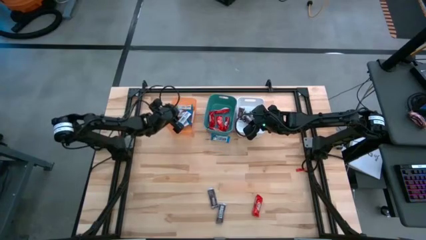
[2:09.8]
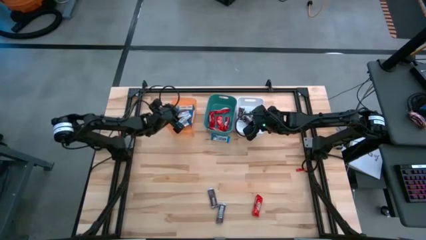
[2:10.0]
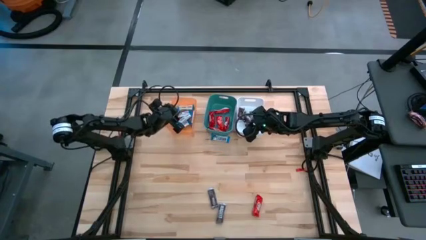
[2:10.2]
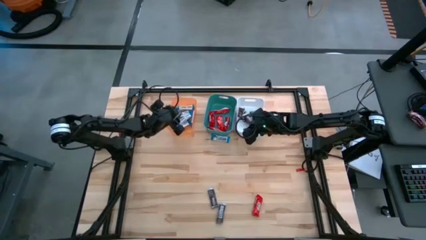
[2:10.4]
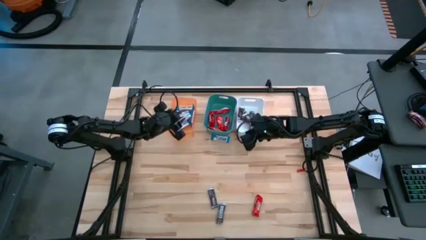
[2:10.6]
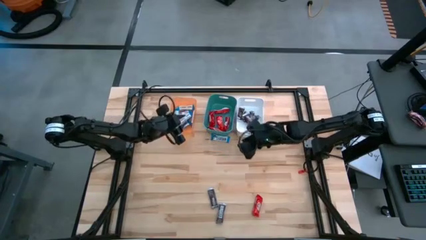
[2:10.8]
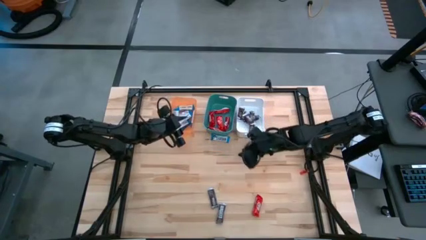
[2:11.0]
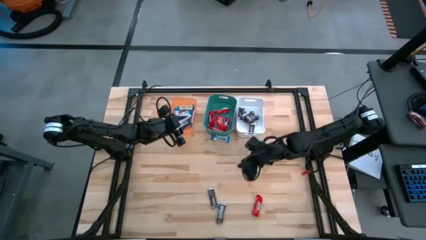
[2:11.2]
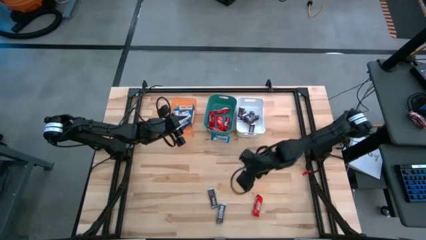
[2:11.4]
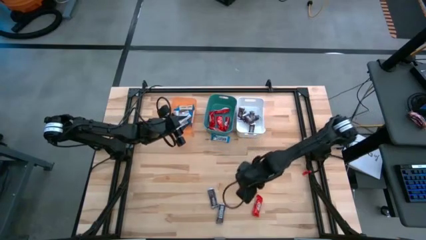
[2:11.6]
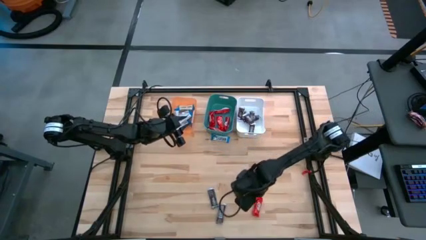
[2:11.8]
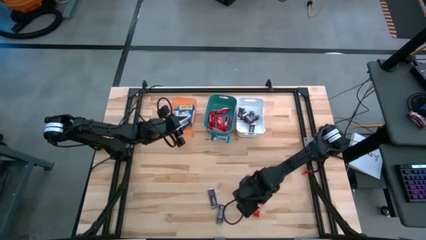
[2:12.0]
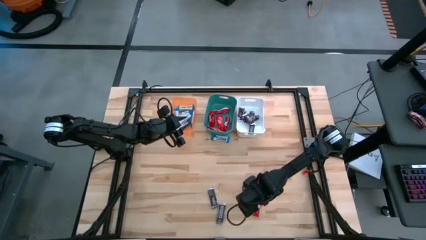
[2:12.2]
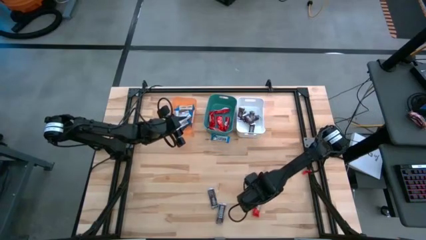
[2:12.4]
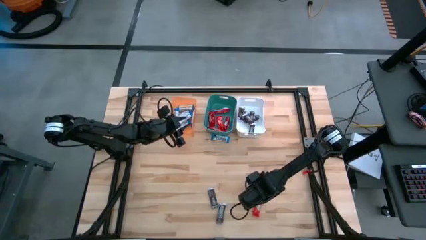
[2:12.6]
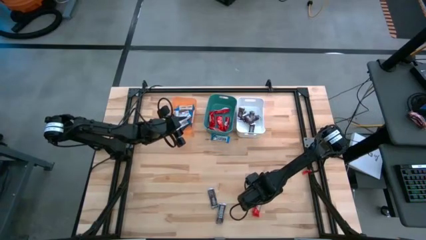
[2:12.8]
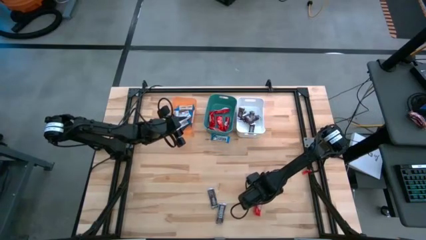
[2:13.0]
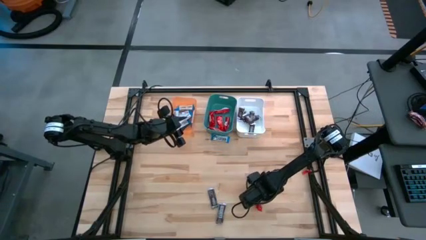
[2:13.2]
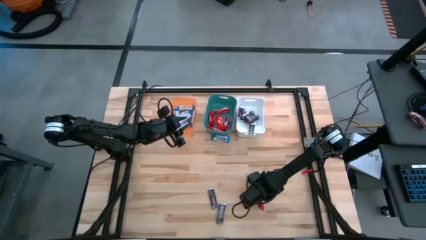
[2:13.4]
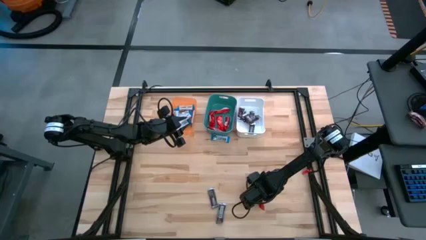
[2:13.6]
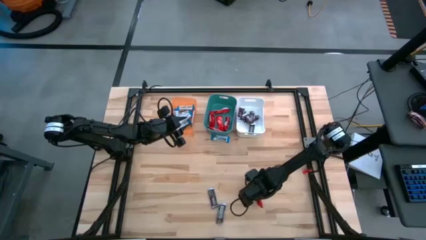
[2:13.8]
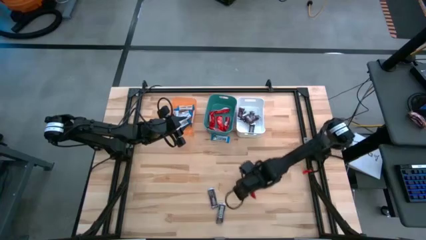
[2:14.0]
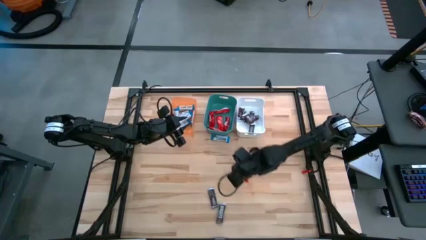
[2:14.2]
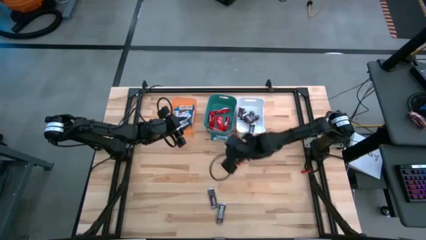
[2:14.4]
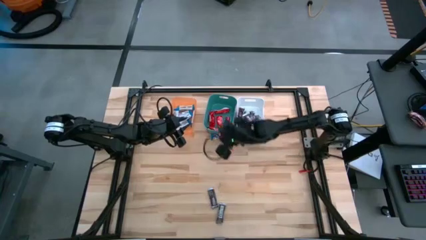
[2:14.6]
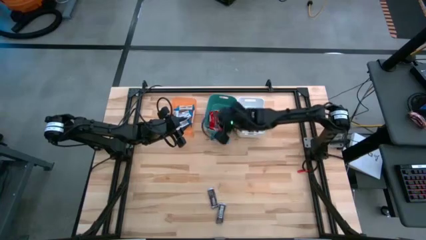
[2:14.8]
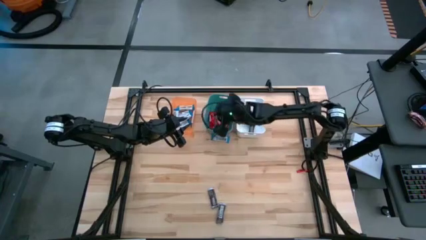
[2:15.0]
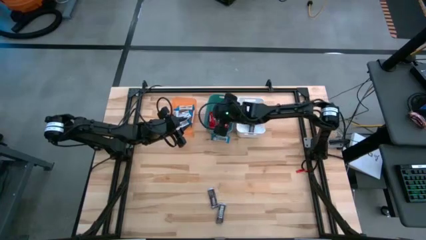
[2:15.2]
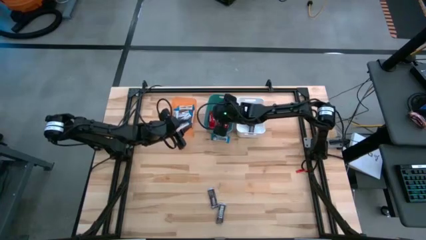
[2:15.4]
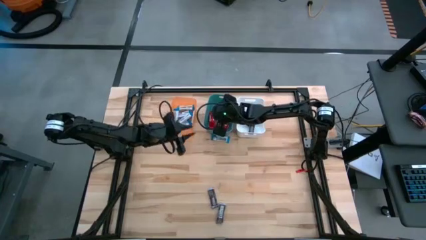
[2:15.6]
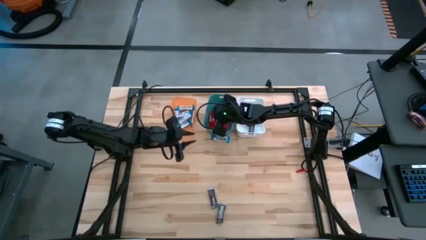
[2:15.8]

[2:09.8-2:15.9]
Task: Organize candy in baskets
Put the red chocolate into the green bin

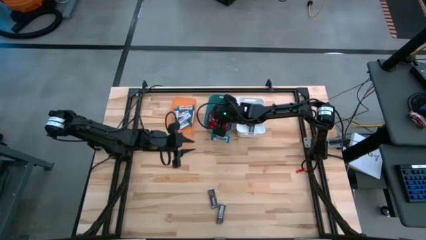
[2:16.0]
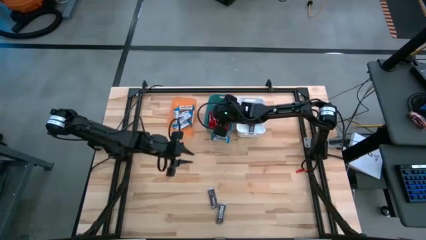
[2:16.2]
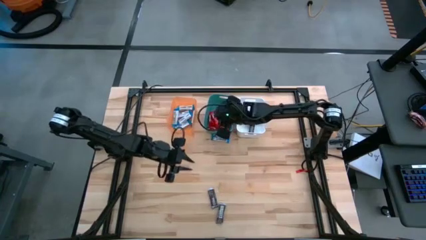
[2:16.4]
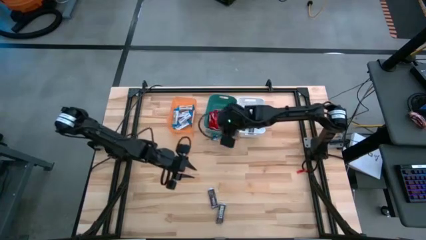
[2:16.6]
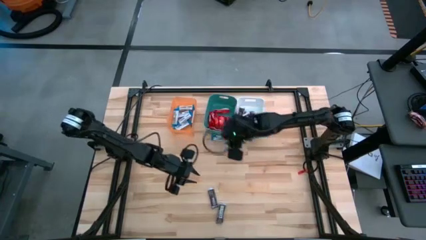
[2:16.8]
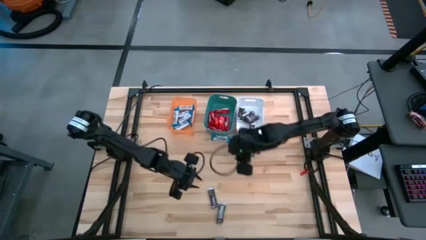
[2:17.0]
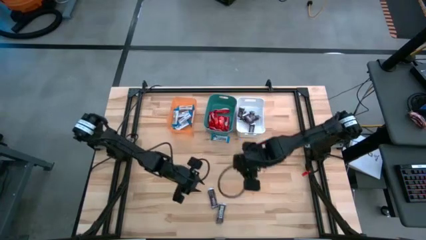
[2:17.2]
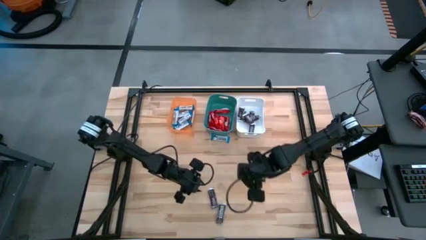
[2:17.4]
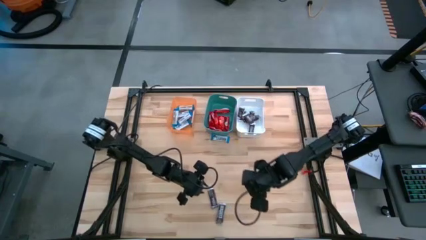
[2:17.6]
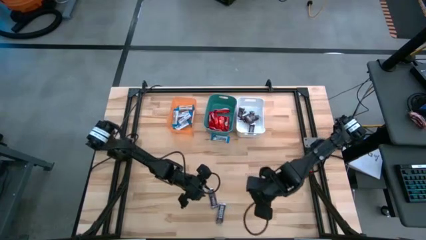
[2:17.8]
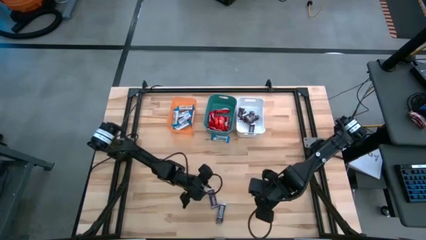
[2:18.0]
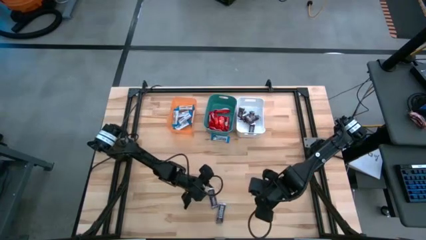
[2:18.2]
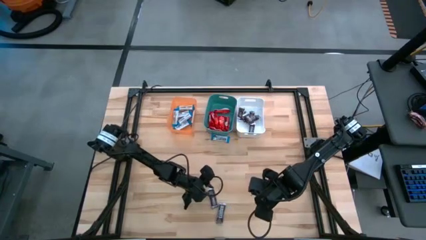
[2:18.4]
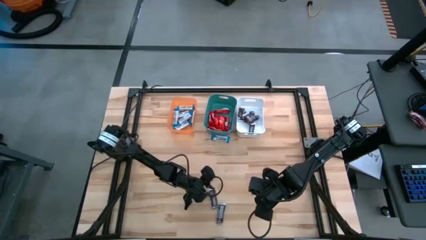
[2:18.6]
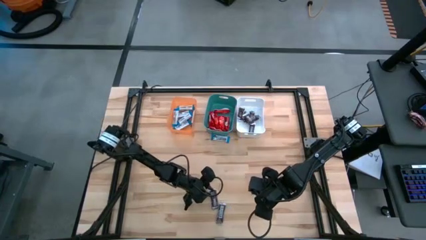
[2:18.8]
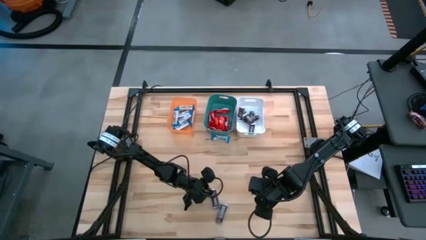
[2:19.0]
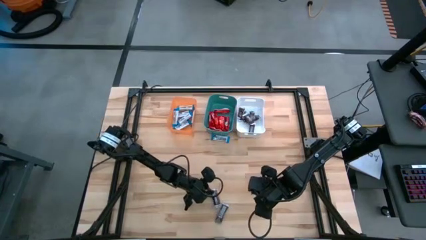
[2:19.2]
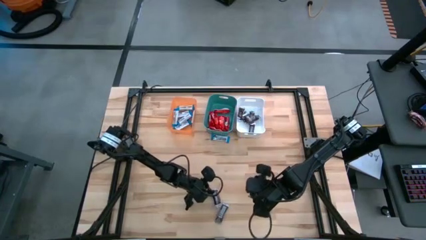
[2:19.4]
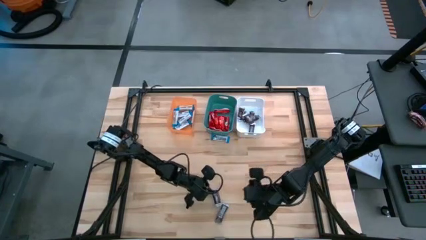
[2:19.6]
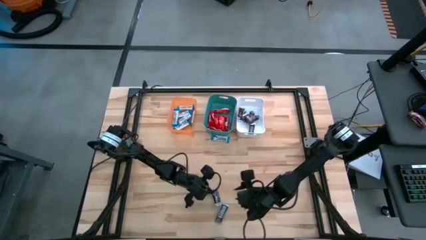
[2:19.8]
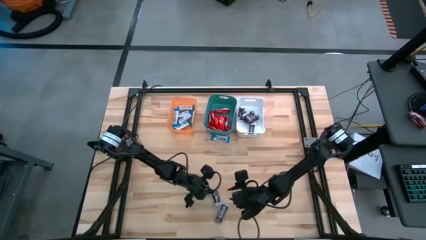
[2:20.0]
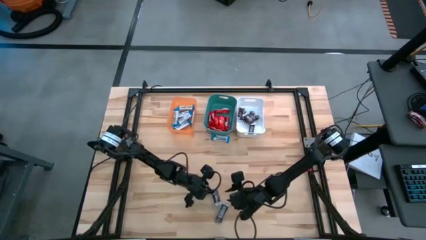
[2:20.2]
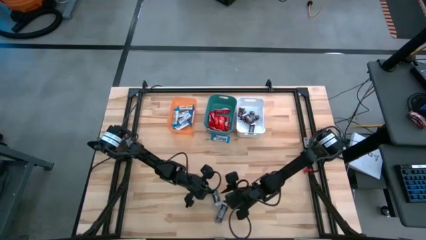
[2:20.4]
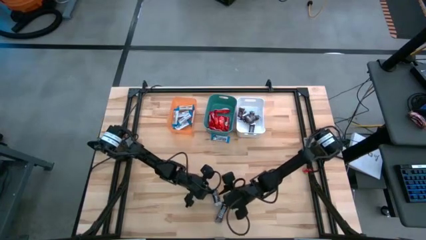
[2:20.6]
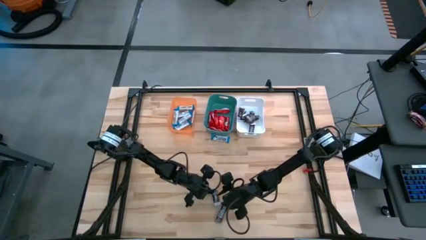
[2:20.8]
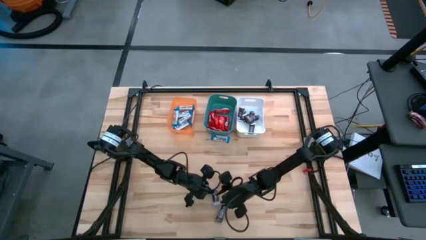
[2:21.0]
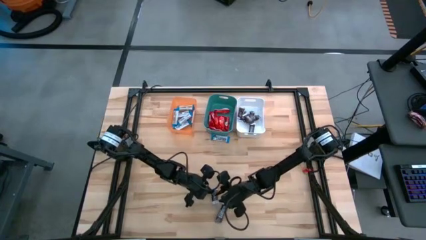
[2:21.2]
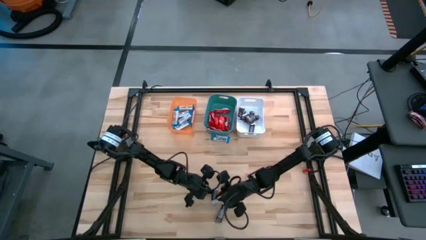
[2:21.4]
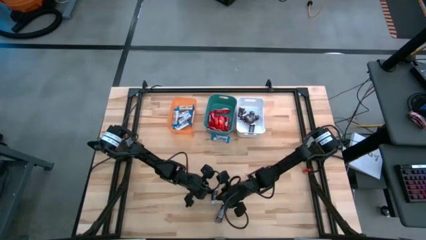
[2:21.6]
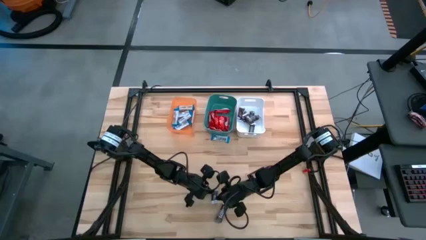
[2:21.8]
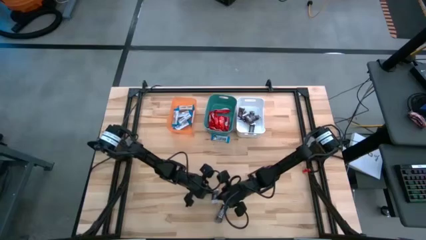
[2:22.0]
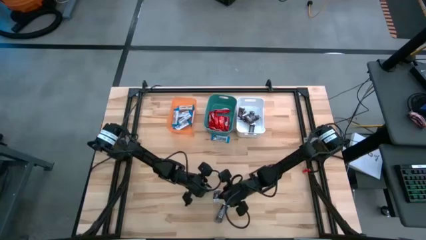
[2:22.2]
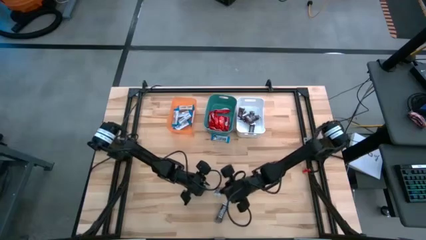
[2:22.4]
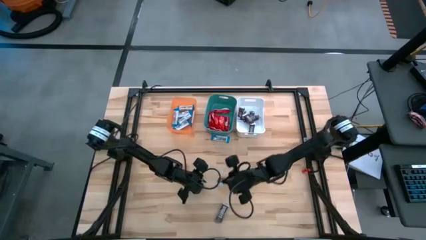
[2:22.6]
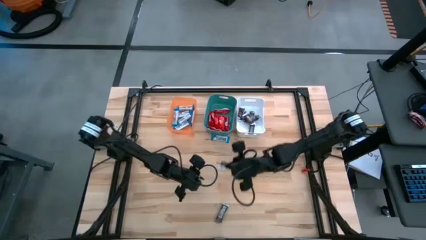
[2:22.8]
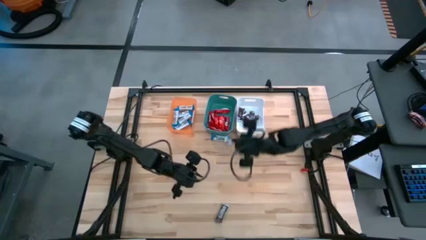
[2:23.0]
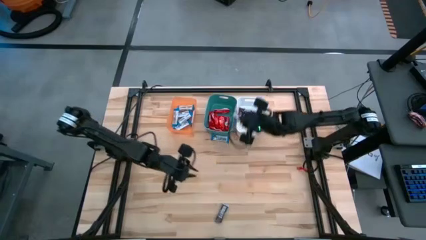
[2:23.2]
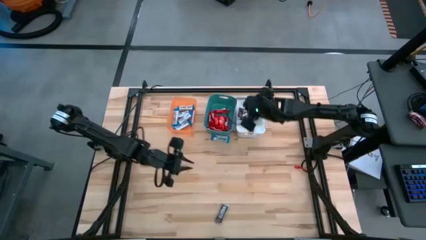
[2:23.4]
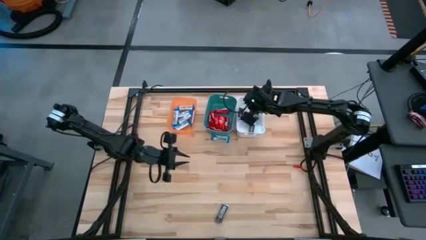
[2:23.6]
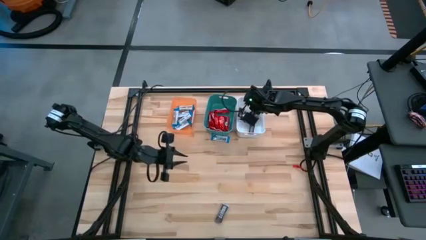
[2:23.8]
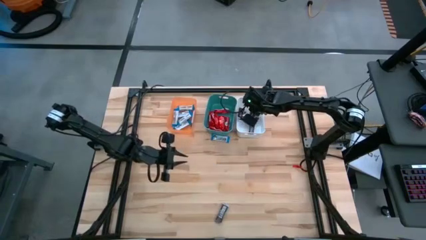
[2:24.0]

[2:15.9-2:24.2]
Put the brown chocolate into the white bin

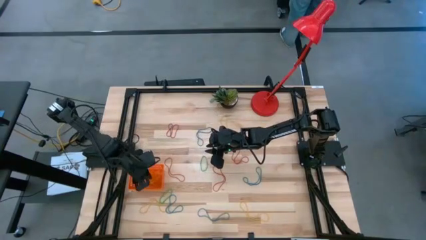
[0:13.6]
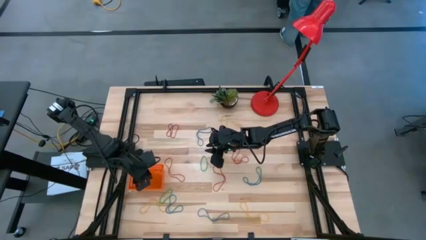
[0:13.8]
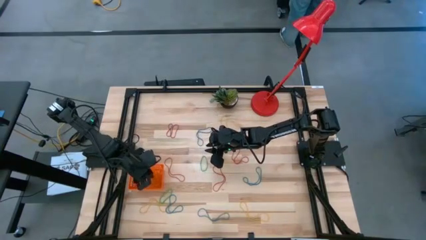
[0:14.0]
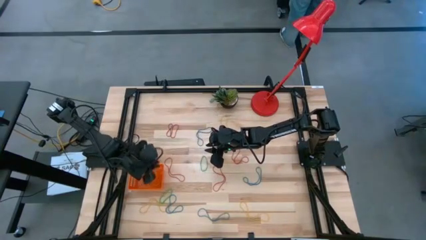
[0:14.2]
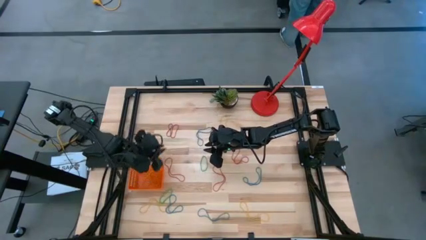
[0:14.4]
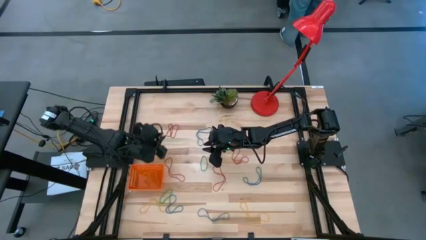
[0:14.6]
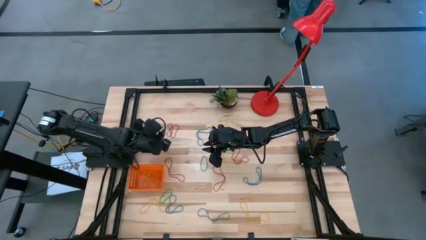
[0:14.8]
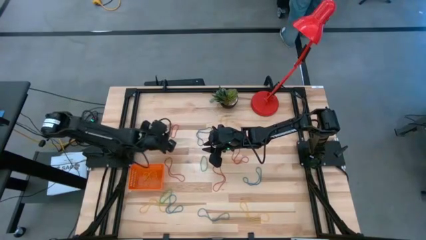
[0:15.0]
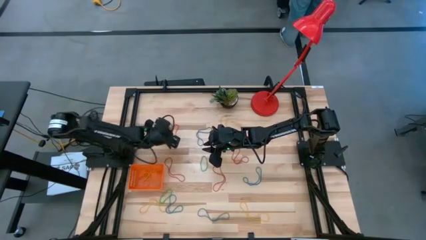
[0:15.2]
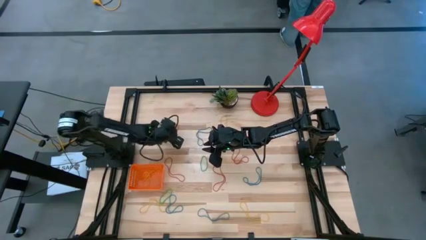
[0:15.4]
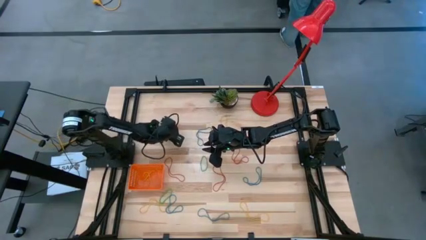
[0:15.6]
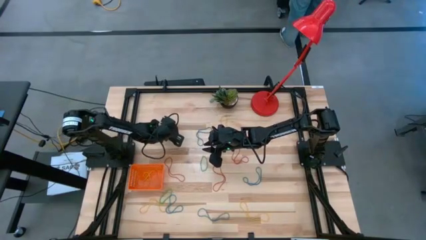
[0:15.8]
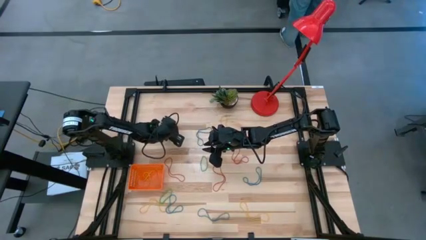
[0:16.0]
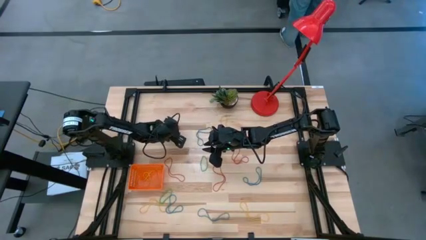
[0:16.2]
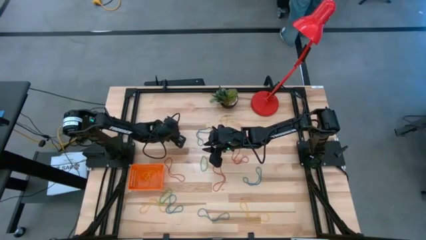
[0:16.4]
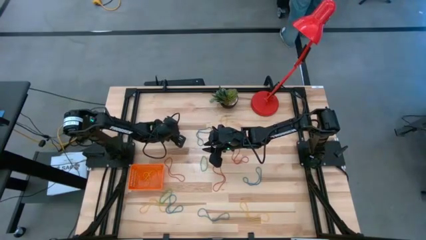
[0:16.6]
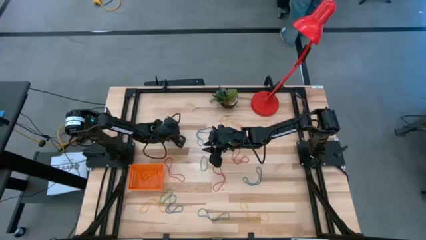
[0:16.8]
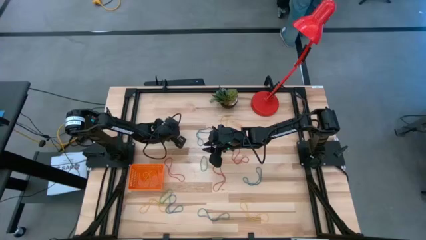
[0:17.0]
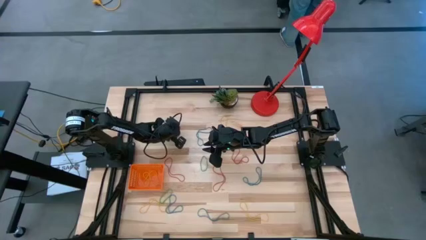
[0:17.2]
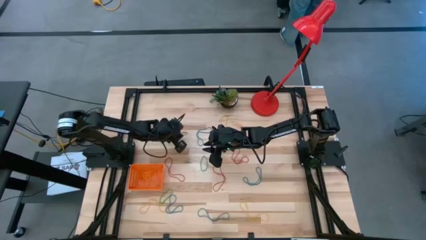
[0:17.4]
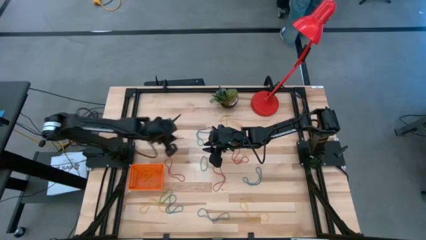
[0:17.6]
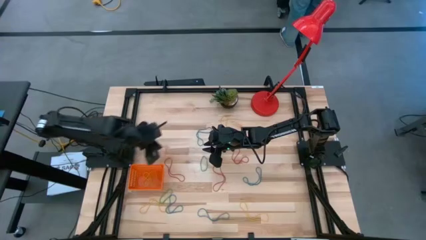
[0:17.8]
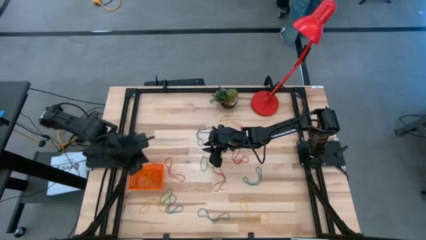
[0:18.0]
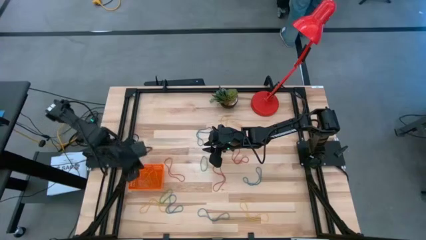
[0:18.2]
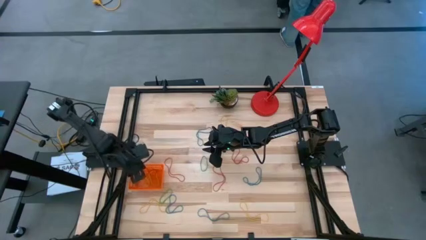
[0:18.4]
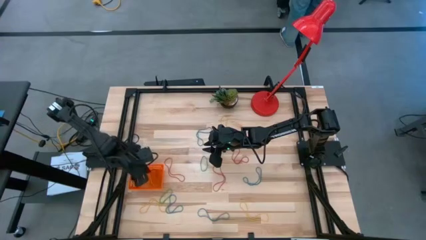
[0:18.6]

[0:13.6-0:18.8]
Task: Pick and place rubber bands into bin
Put the red rubber band into the orange basket
